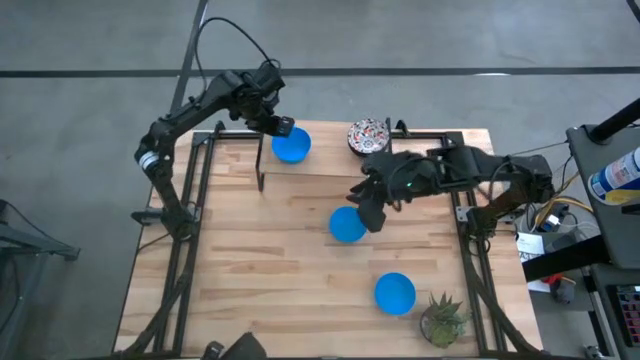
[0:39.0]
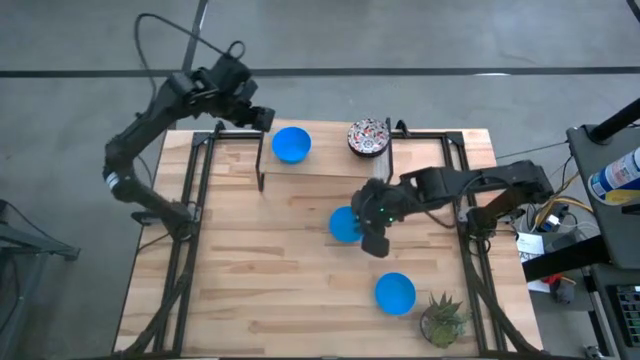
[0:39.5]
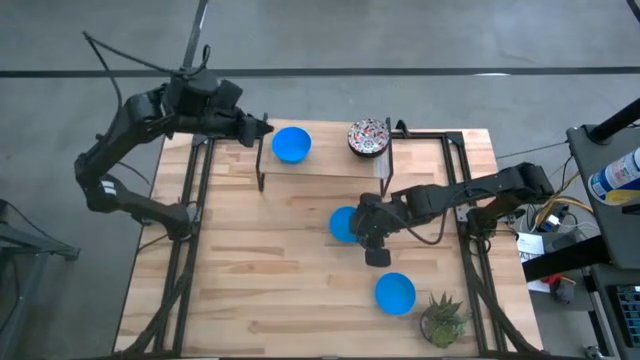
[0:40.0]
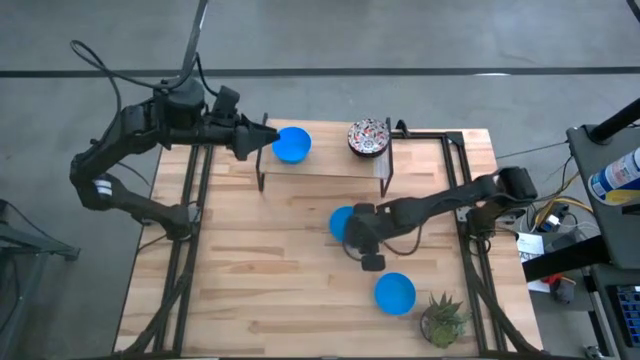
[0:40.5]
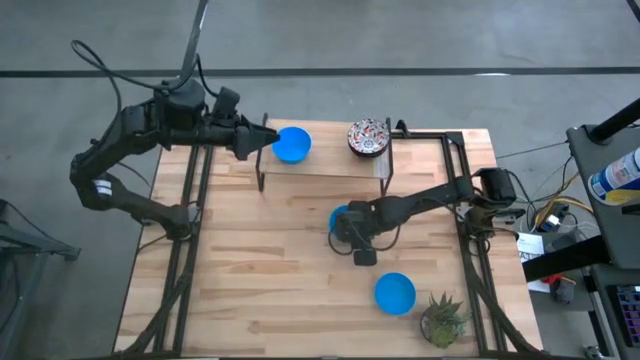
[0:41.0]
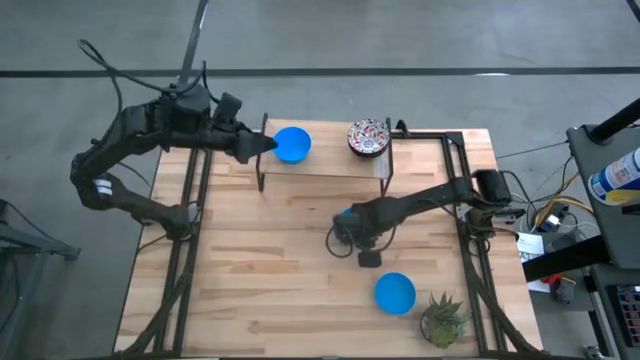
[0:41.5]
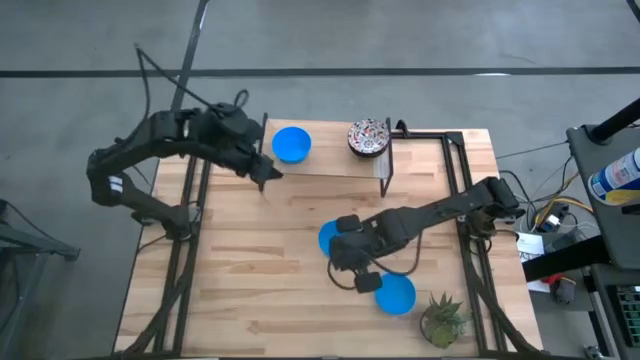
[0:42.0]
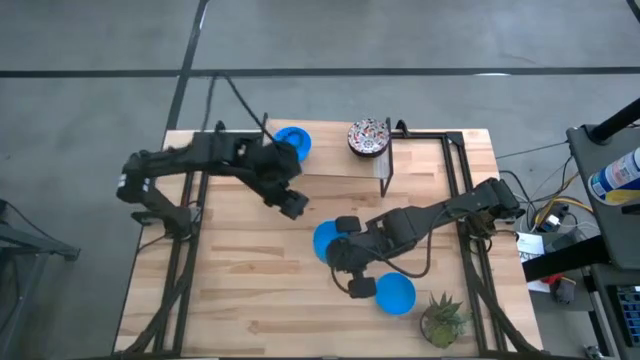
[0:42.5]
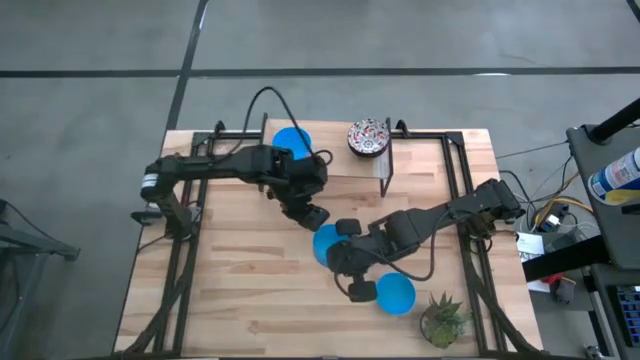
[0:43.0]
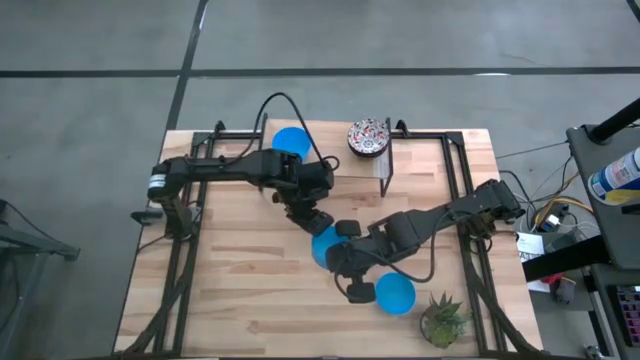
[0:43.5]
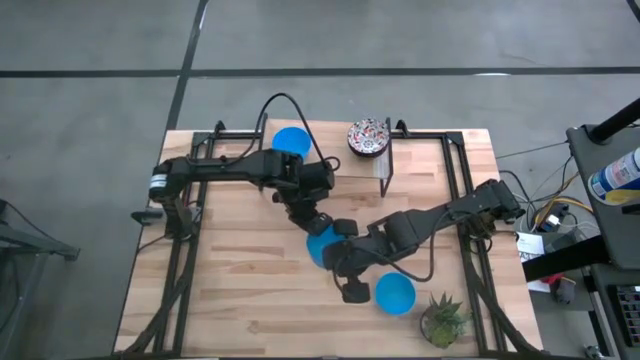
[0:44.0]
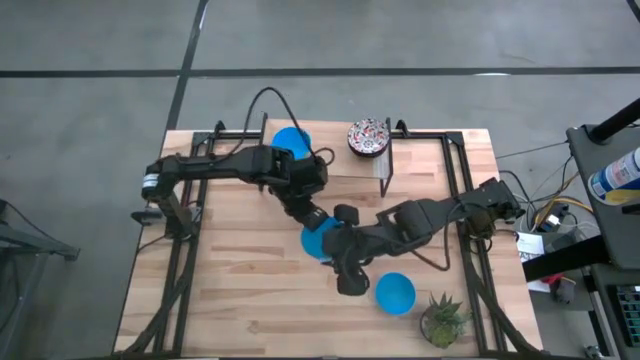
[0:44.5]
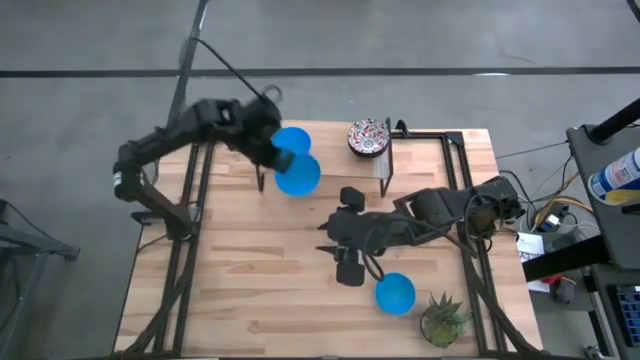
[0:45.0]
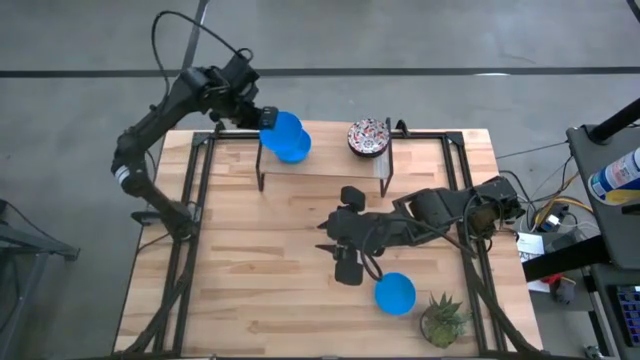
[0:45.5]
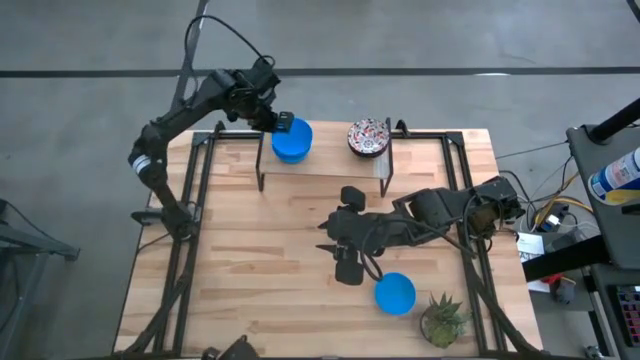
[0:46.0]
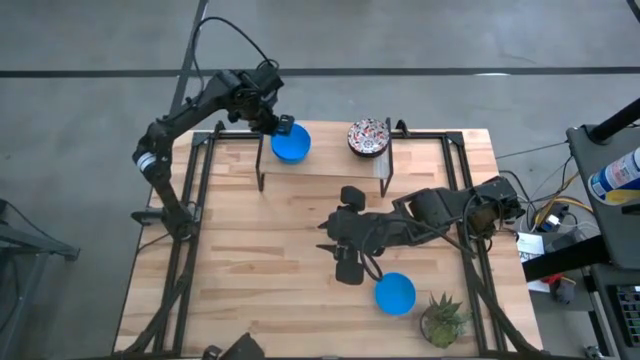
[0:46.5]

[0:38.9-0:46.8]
Task: Pick & Place Mini bowls
Stack the top blue bowl on the other blue bowl on the shelf

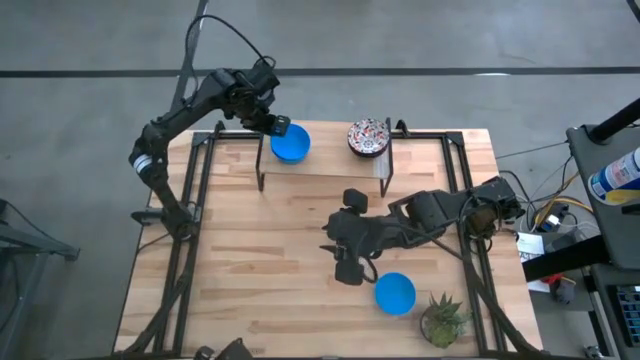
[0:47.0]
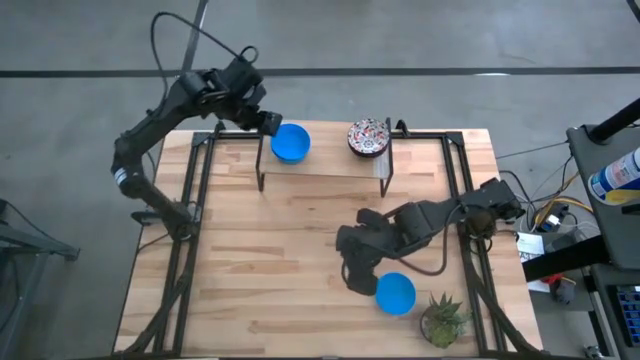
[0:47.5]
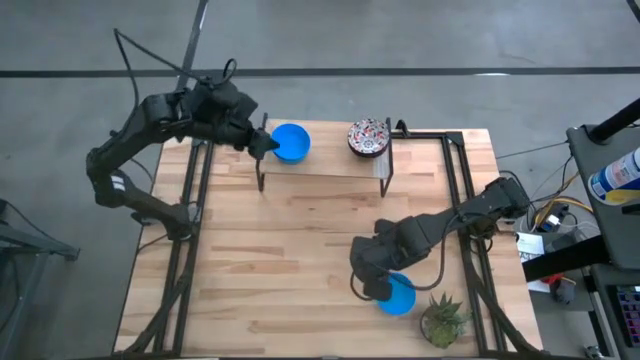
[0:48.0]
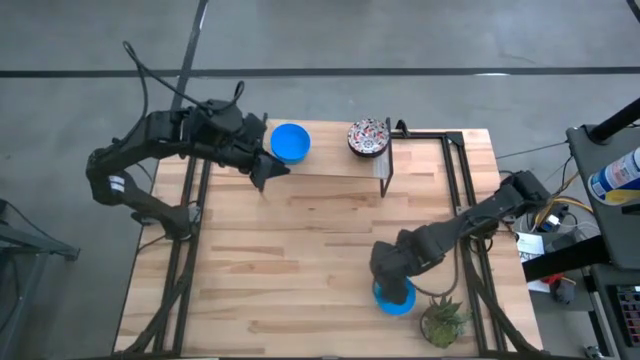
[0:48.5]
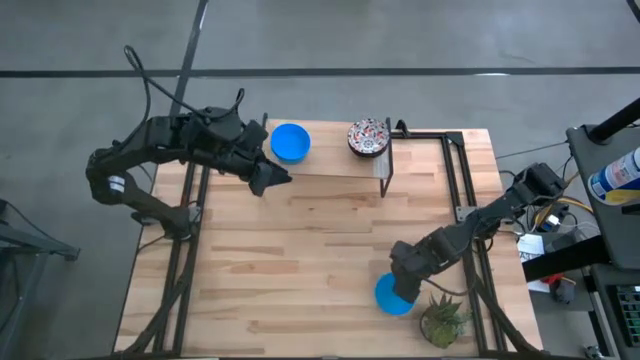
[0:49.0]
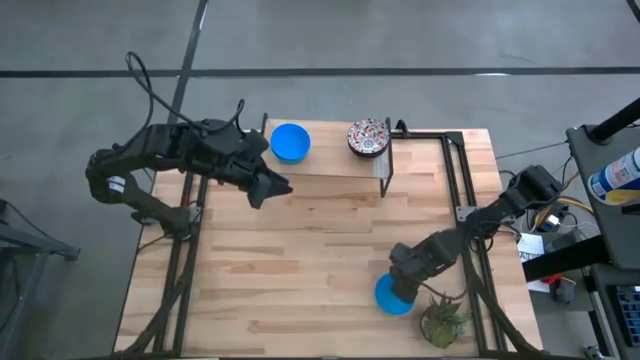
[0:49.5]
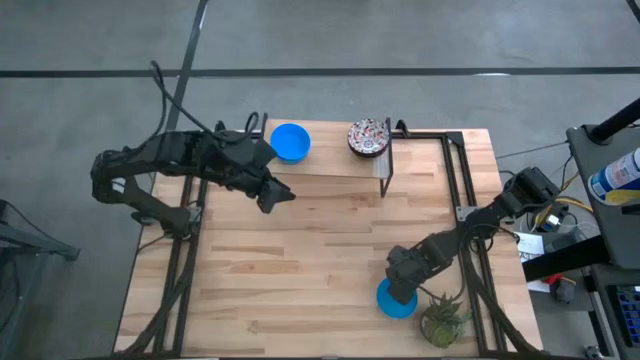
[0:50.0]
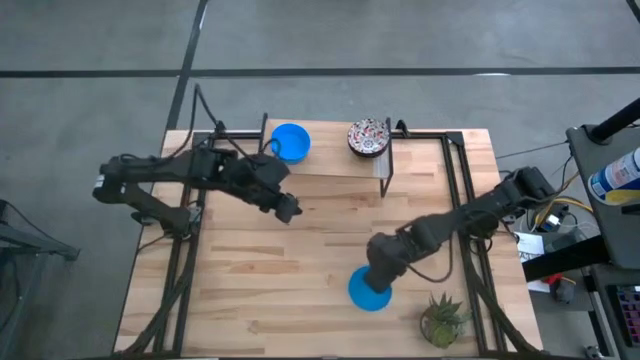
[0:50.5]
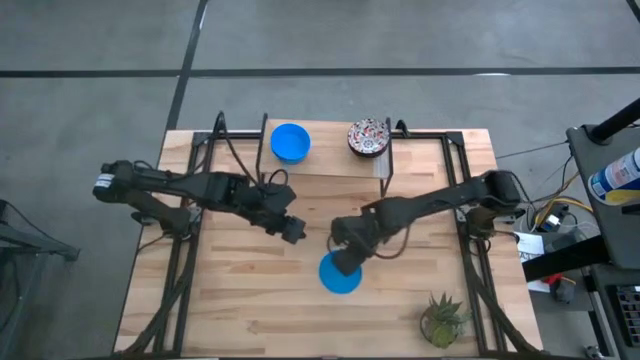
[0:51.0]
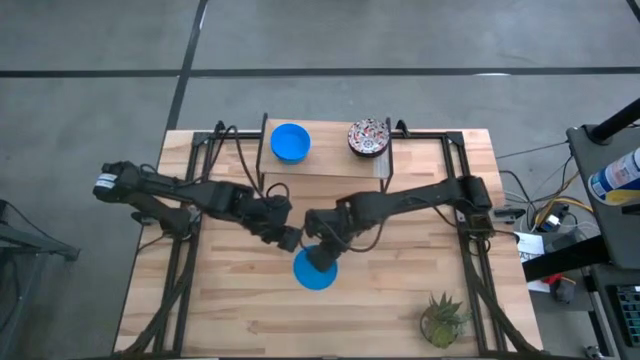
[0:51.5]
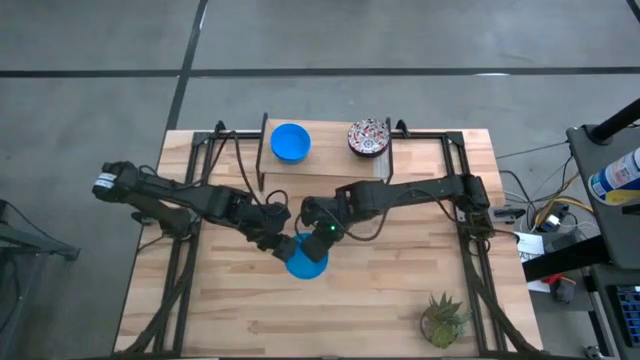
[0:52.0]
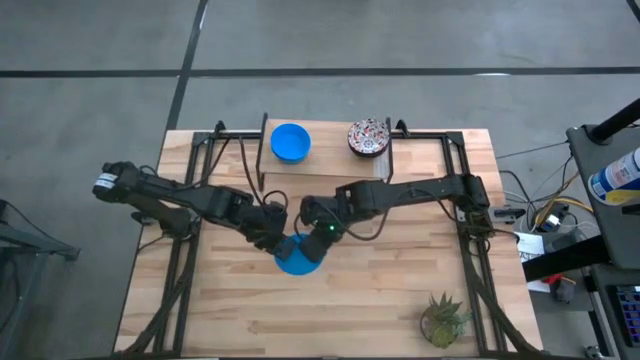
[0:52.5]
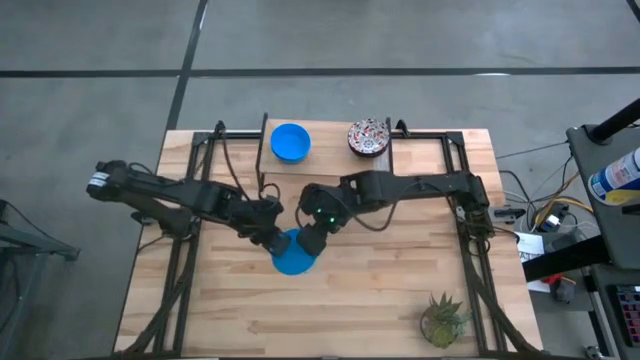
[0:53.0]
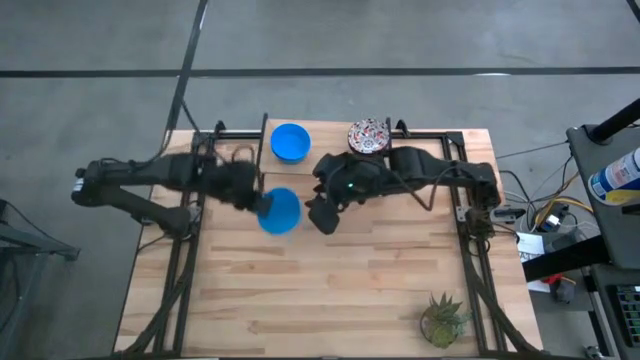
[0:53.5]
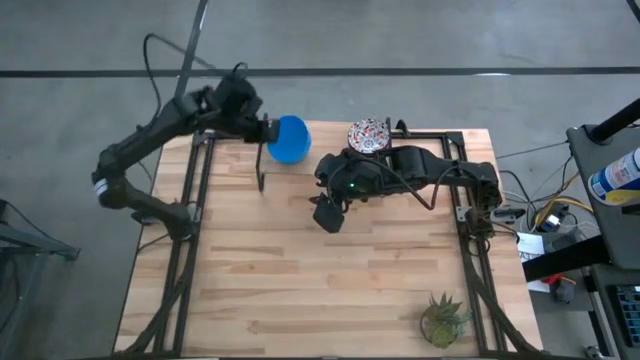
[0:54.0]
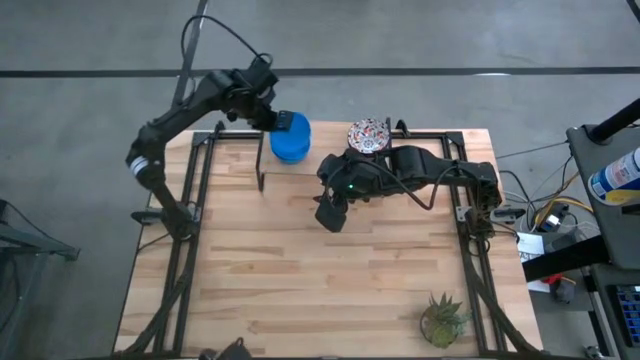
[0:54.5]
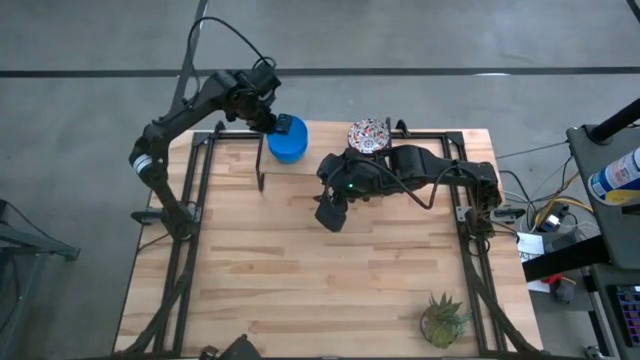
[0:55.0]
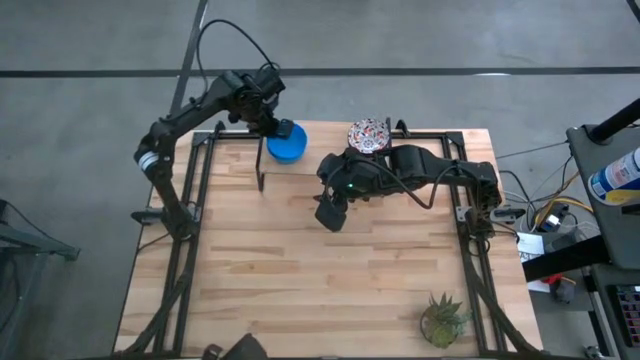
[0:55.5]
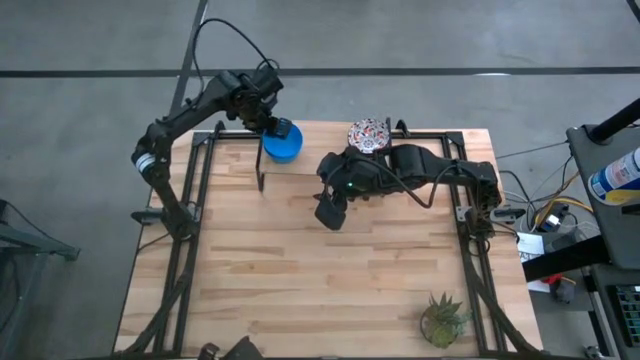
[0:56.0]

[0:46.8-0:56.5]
Stack the blue bowl on the other blue bowls on the shelf

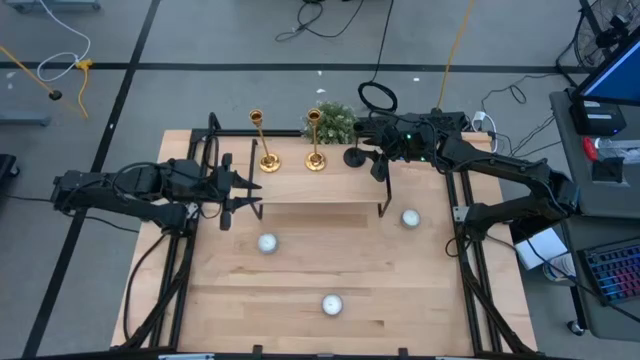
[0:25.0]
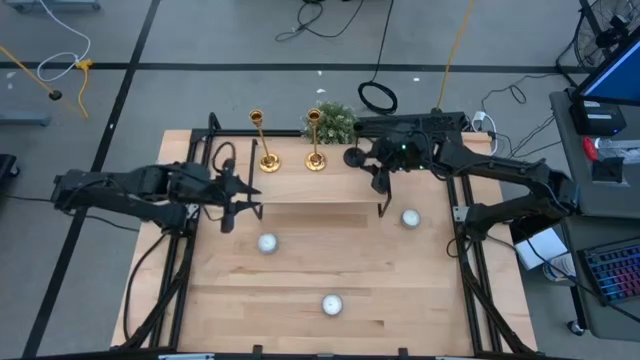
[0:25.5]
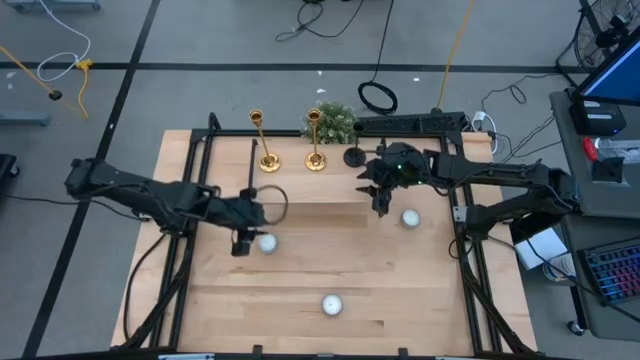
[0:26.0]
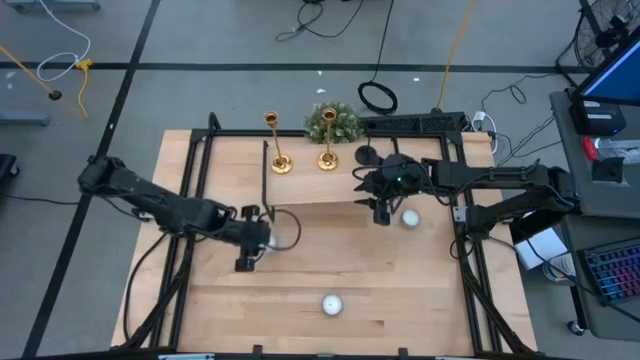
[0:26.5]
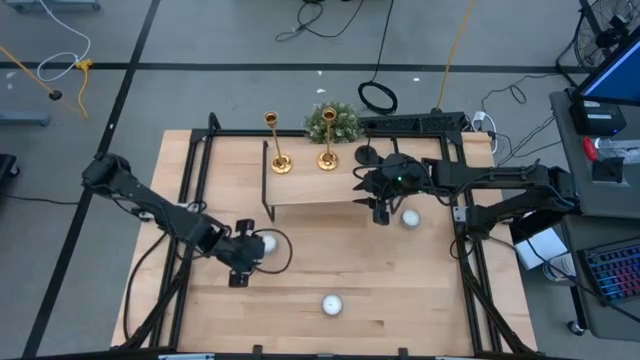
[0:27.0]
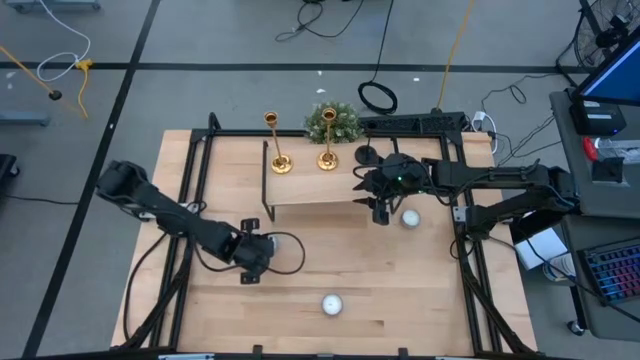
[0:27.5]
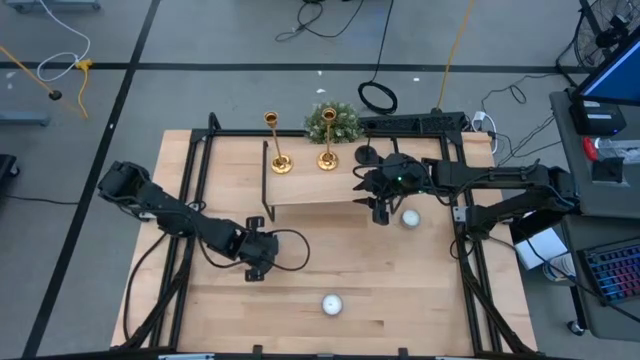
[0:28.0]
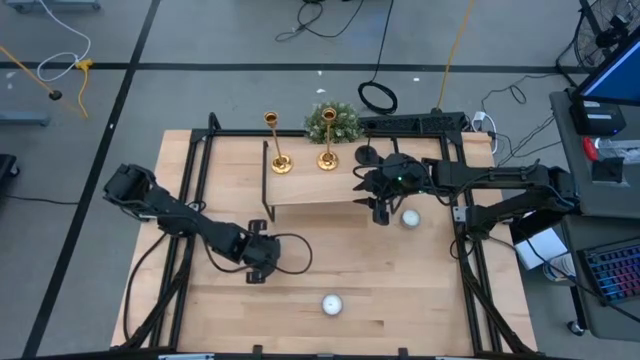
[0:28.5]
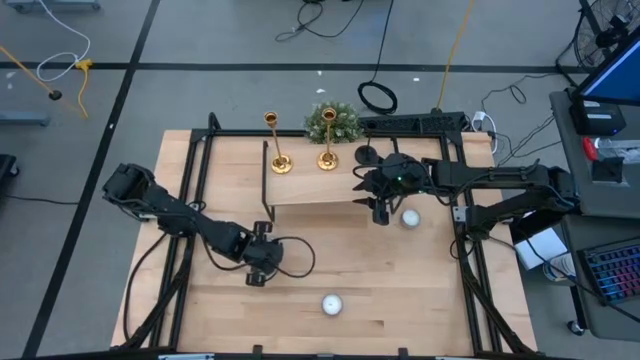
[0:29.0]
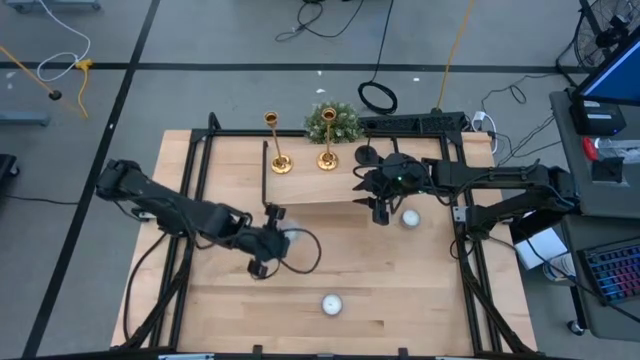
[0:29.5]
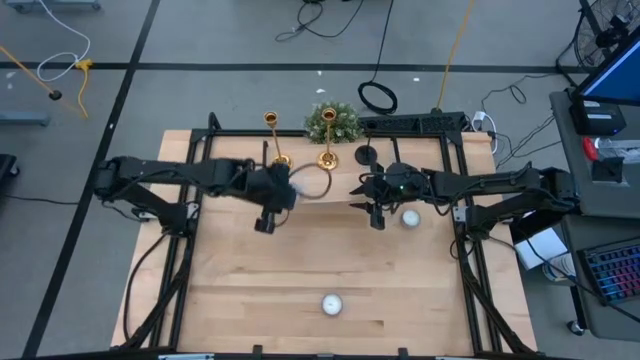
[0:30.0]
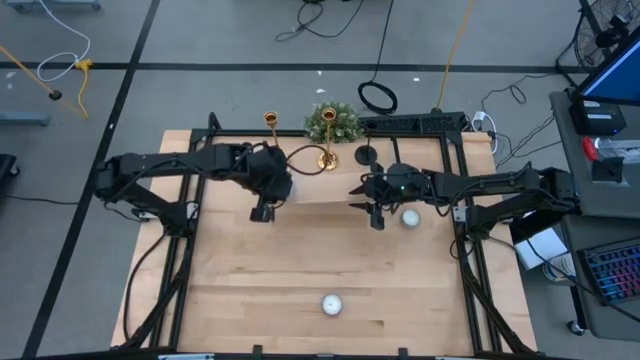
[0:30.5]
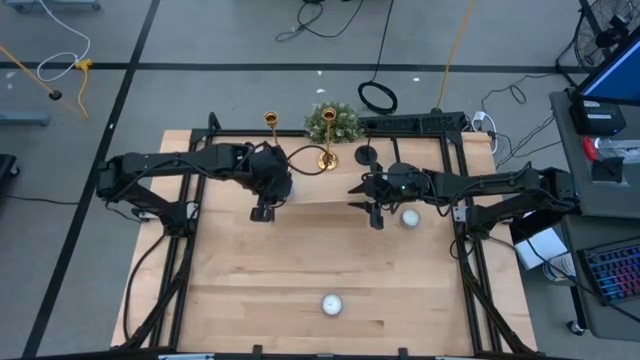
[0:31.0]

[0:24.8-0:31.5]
Task: Pick & Place candle stick holders
Put the white scented candle on the shelf
